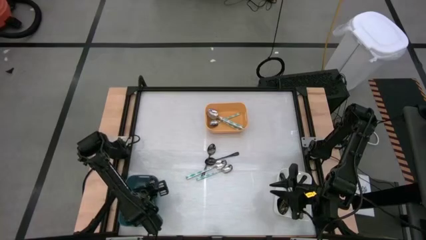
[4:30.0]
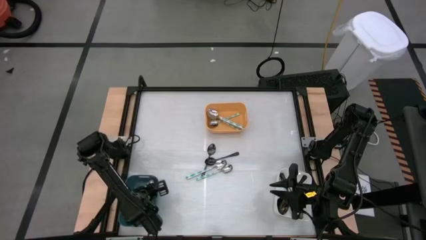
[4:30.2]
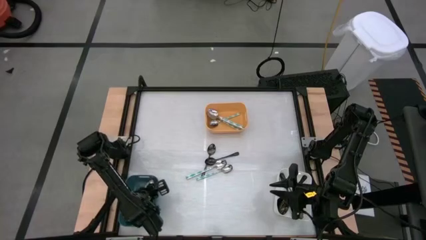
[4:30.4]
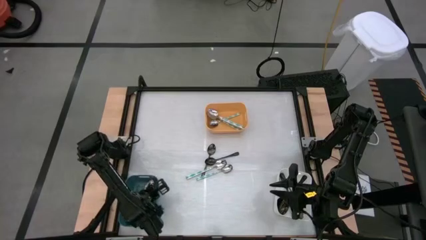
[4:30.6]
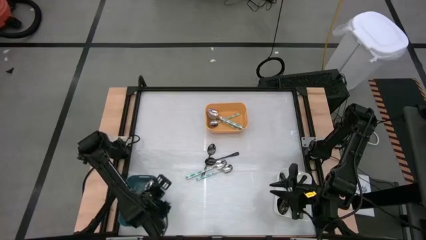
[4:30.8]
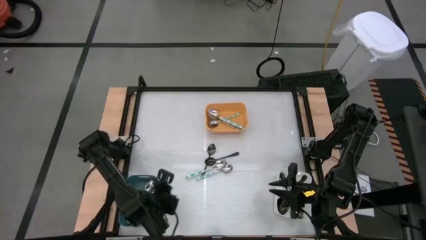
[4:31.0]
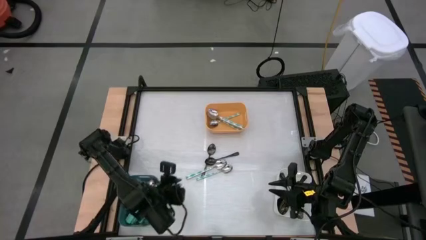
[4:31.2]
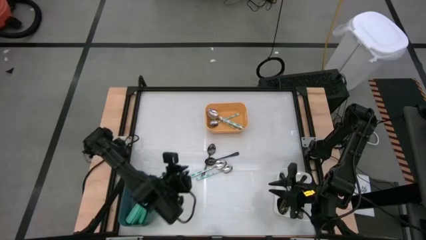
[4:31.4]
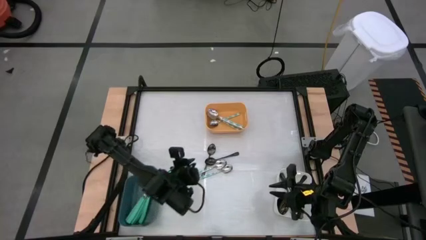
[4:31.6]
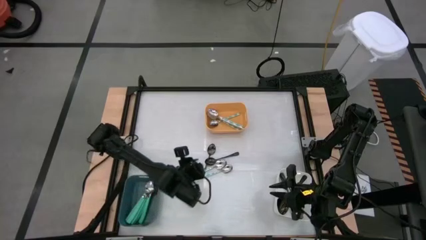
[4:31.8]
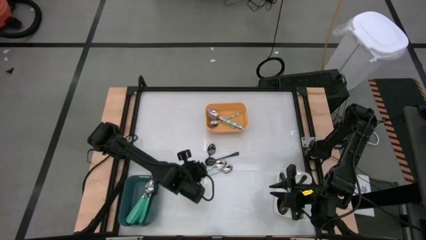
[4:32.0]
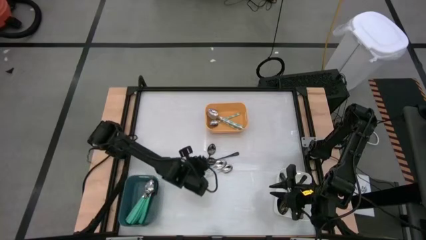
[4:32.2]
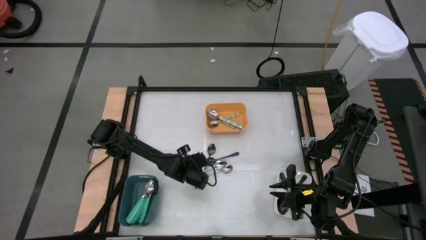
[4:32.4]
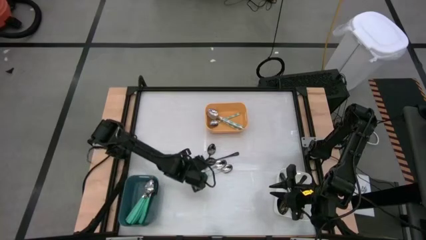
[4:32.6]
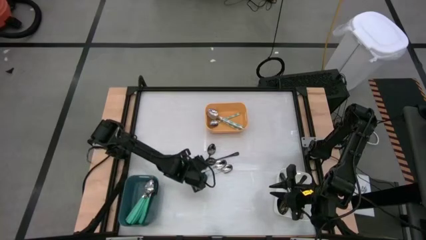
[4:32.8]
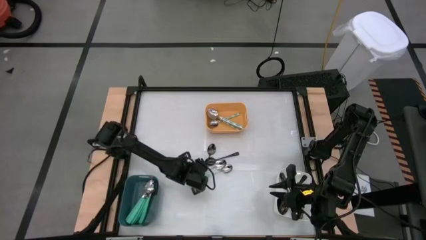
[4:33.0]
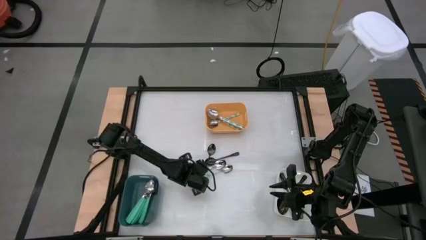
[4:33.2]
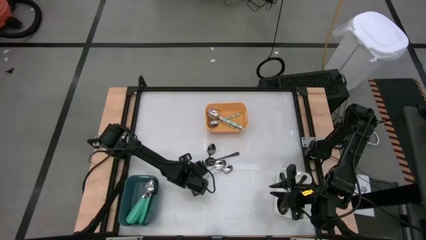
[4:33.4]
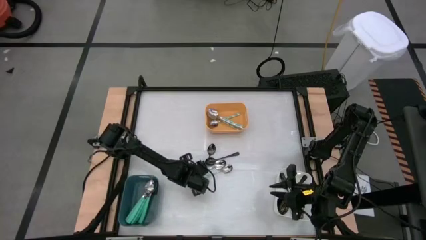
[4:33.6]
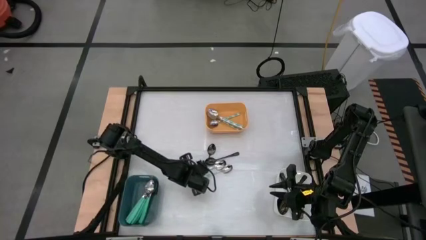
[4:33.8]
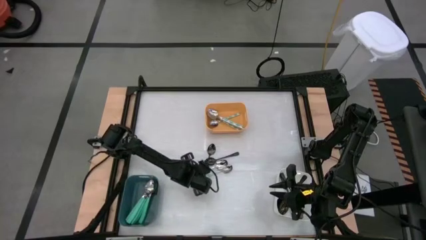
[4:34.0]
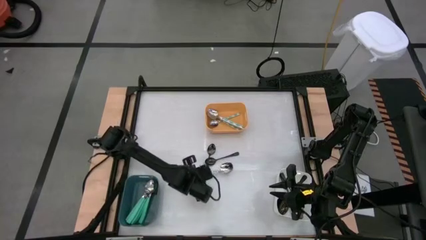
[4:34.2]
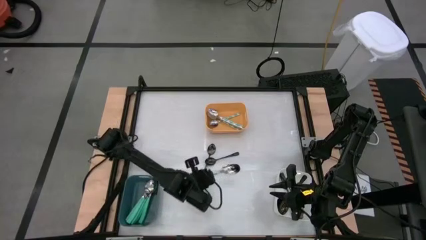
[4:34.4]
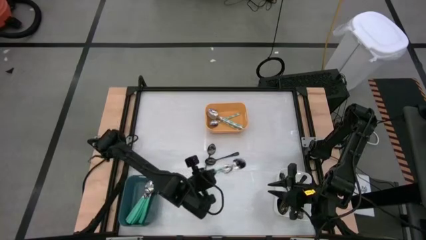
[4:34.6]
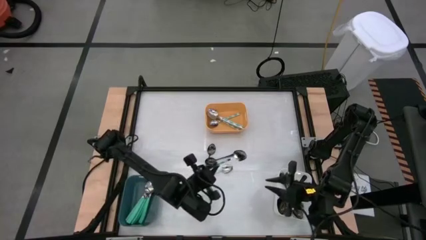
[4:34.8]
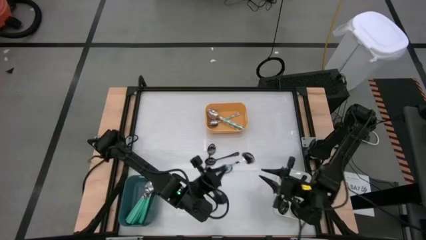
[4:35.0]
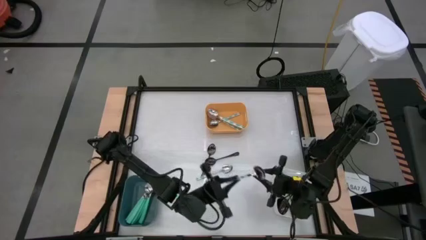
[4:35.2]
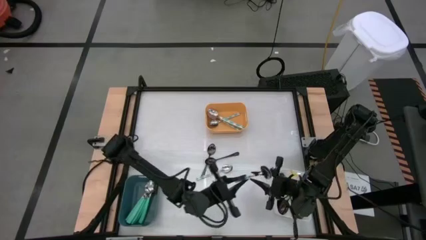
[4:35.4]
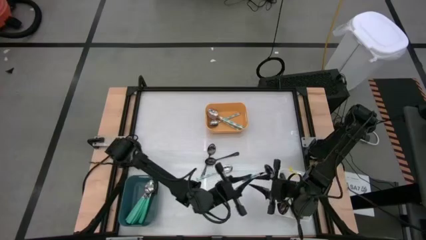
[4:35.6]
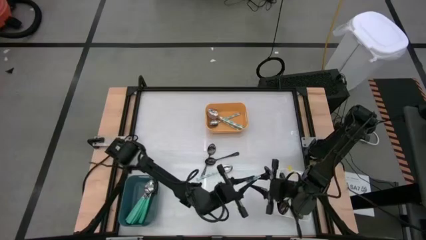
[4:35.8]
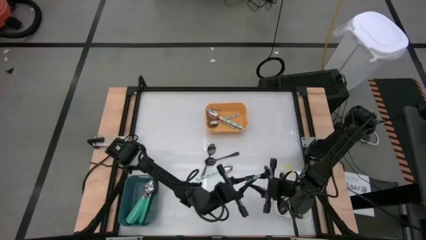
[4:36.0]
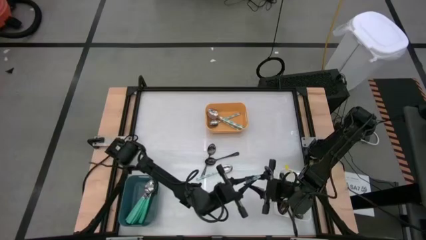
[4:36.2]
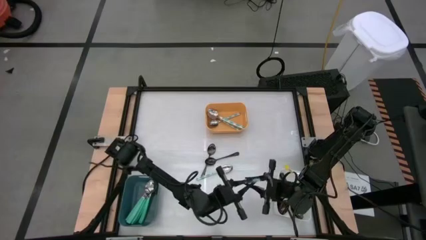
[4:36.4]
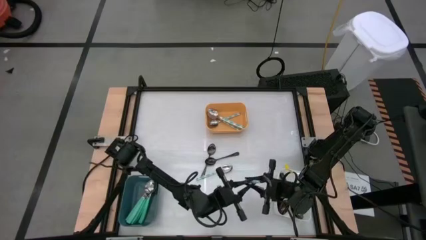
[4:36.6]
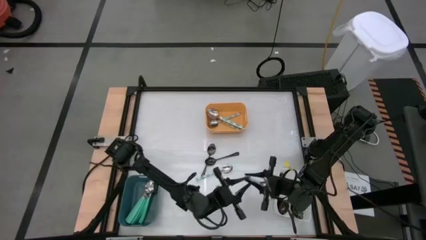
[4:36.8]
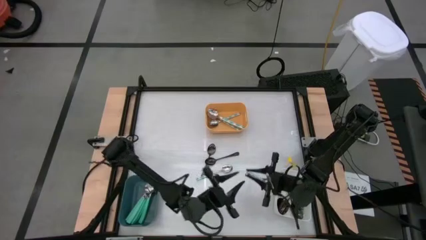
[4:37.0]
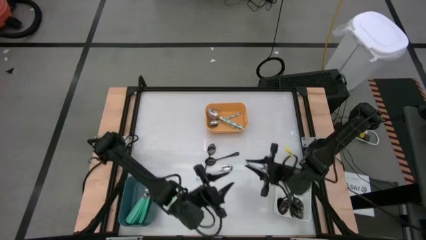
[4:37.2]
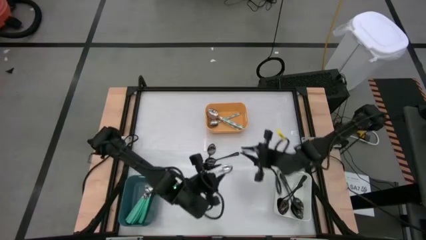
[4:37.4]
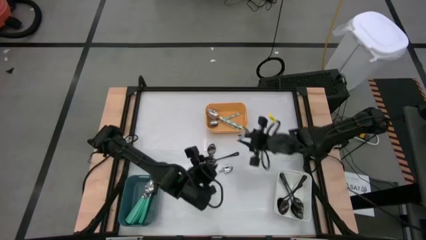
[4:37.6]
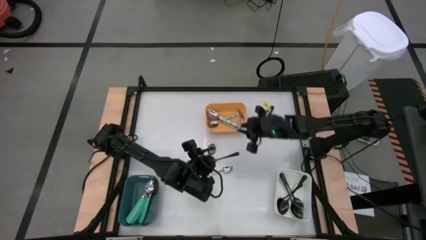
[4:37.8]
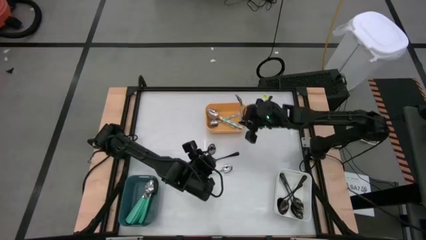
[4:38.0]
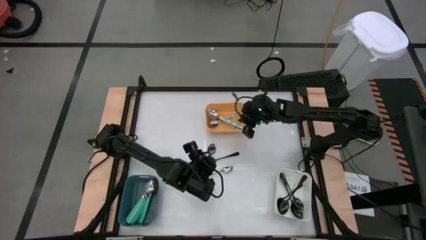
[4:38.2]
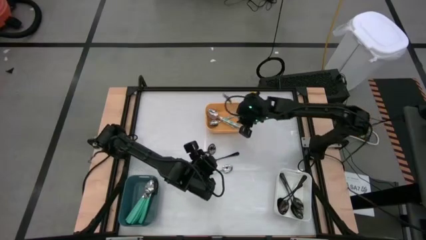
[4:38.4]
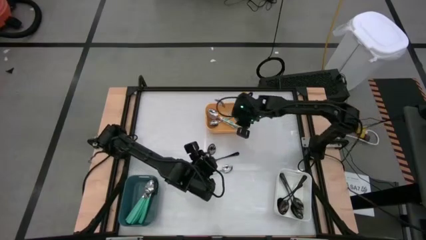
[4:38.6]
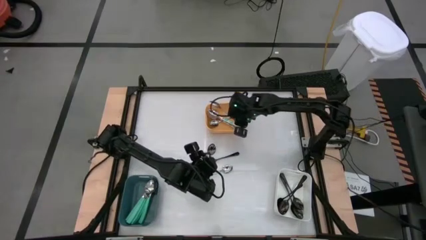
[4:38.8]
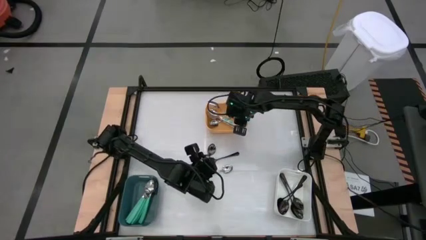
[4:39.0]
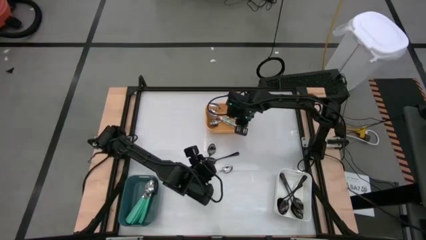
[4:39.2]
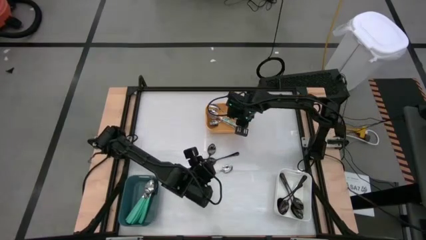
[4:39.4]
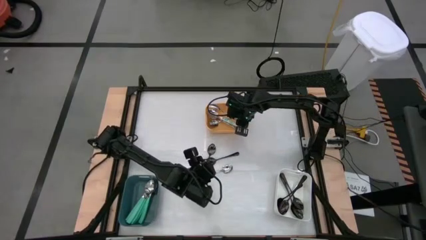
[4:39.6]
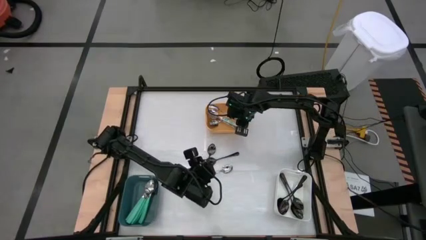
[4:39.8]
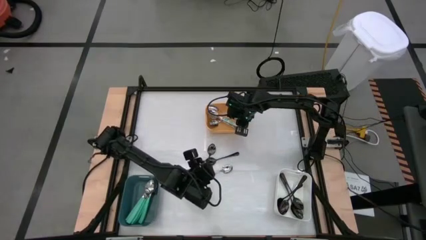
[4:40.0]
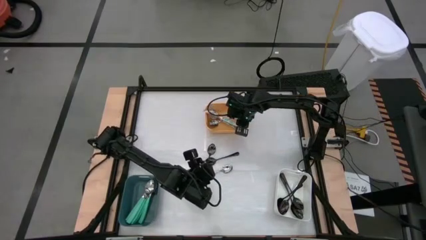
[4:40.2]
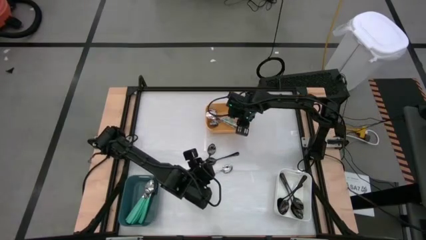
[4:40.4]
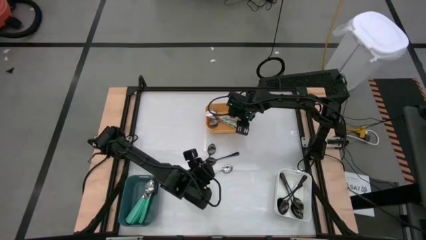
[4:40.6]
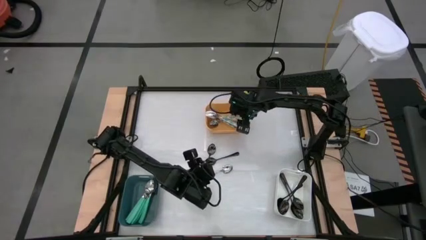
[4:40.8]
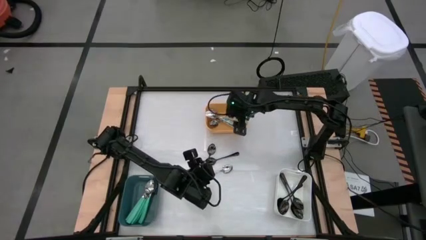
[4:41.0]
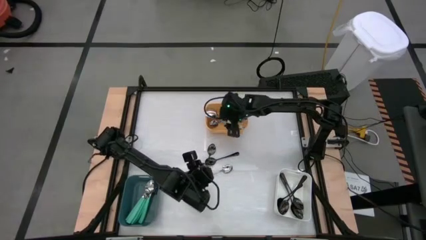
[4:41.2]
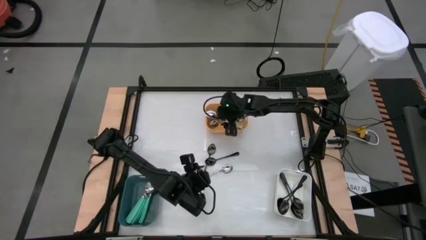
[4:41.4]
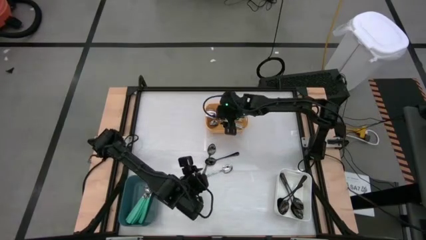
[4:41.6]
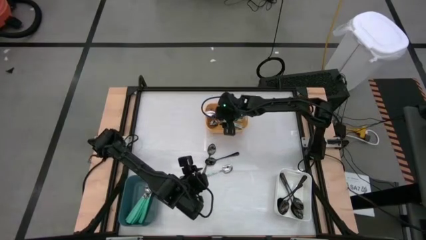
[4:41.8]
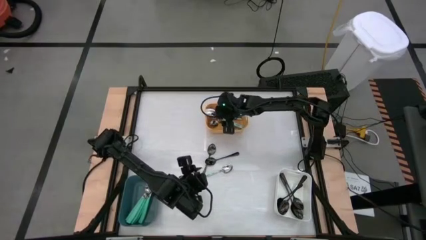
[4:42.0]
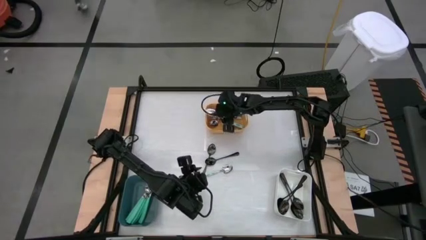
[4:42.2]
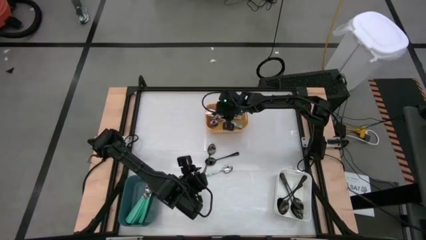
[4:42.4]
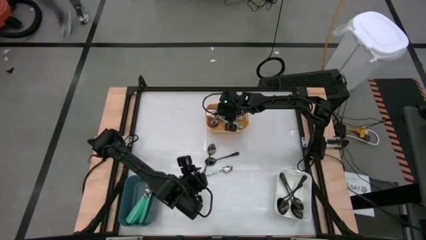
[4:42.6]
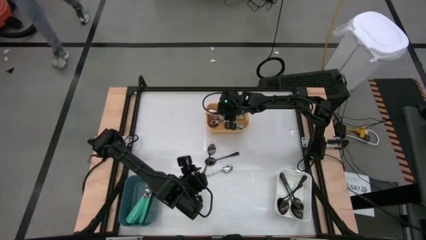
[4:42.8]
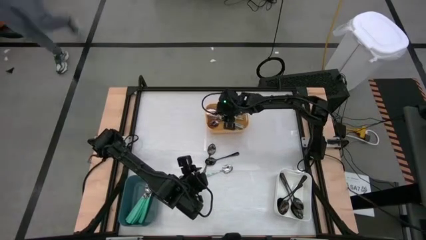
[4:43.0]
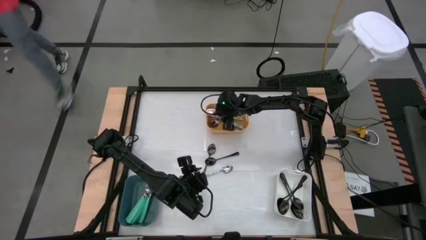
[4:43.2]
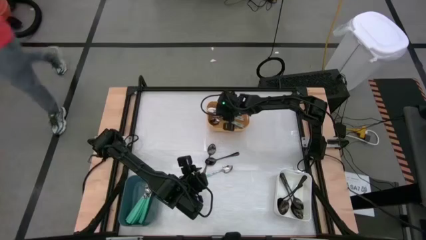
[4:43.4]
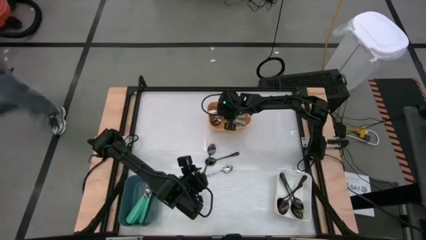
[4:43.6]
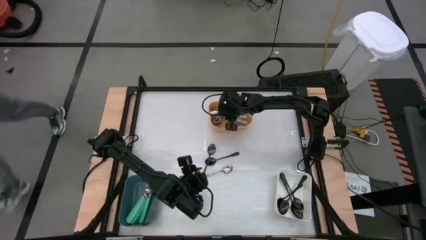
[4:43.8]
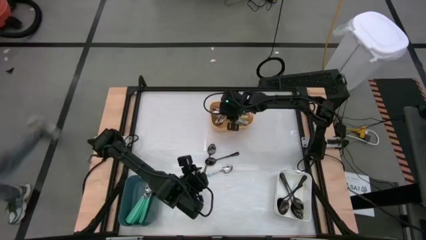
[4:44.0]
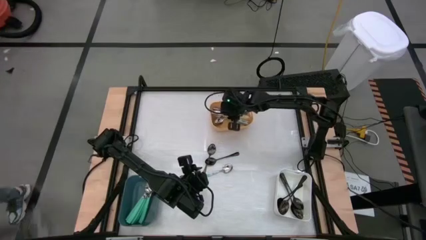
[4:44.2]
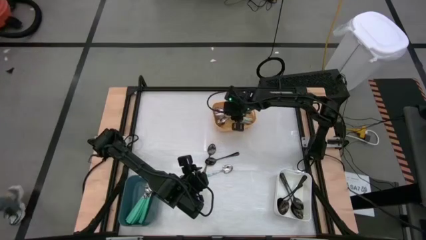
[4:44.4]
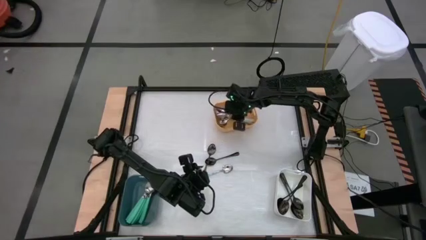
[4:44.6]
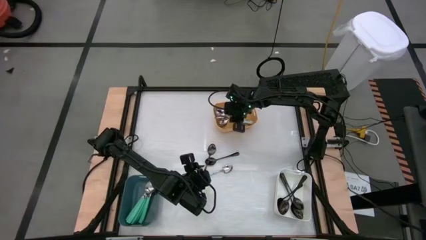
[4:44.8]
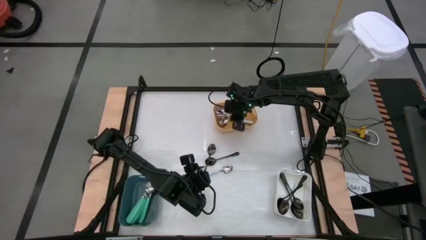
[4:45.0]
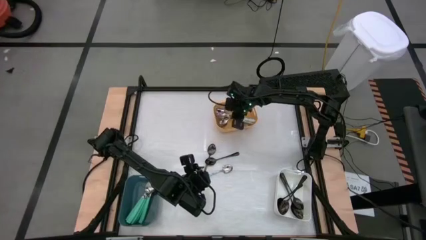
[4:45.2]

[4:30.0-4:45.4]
Task: Sort silverware by color (type)
Put the white patterned spoon into the yellow bin

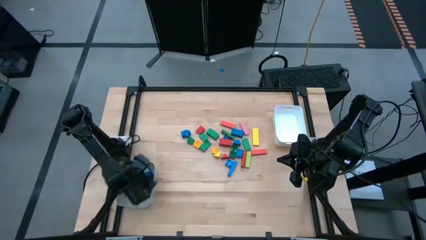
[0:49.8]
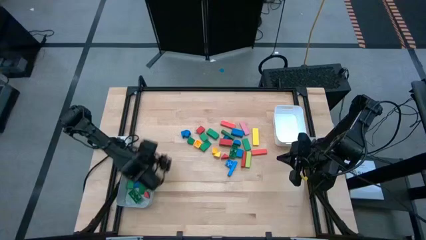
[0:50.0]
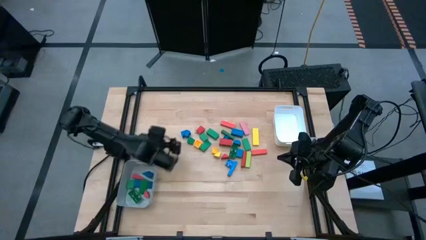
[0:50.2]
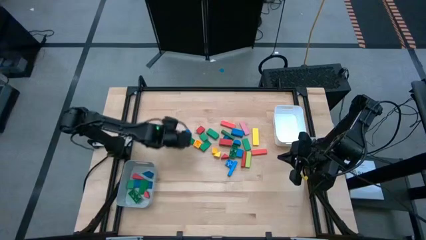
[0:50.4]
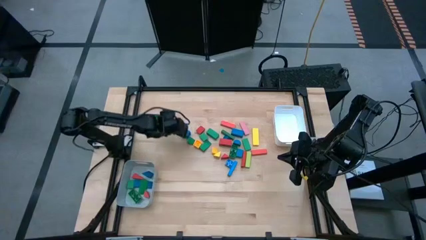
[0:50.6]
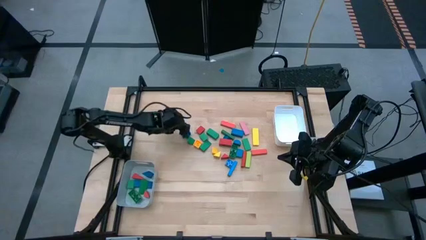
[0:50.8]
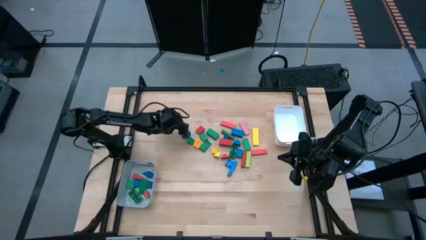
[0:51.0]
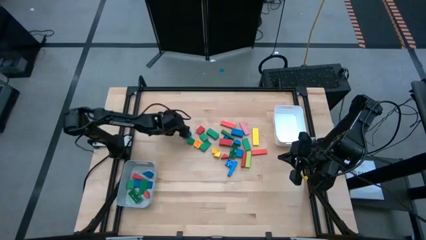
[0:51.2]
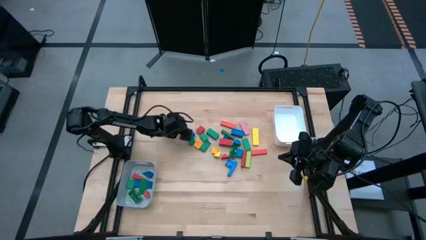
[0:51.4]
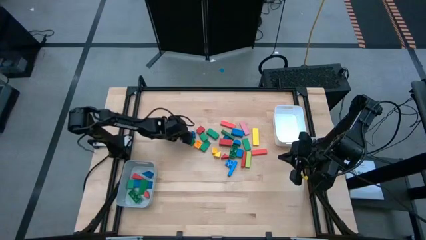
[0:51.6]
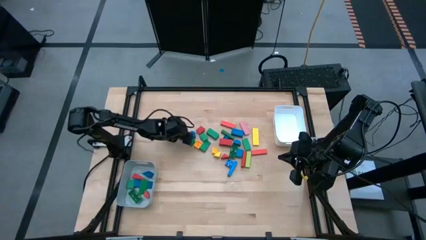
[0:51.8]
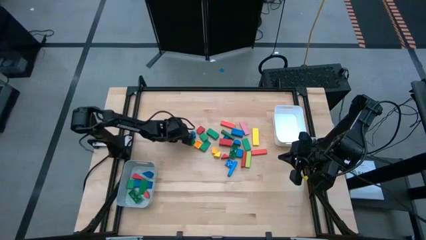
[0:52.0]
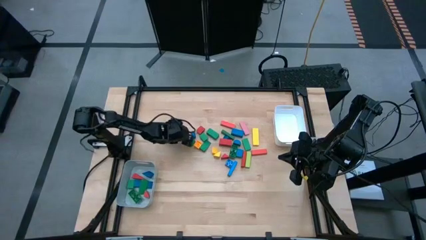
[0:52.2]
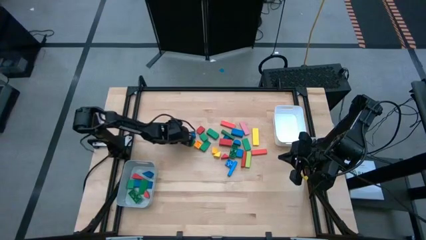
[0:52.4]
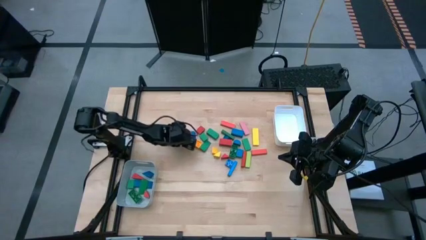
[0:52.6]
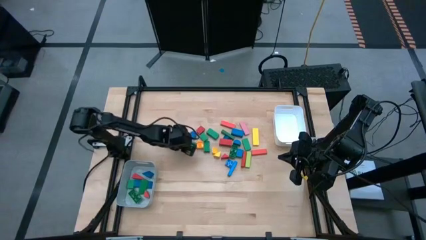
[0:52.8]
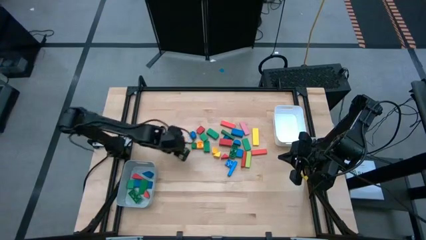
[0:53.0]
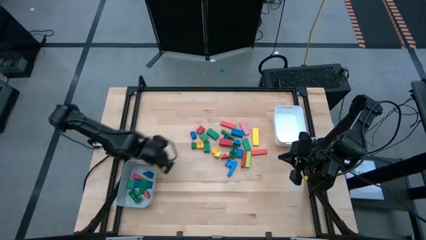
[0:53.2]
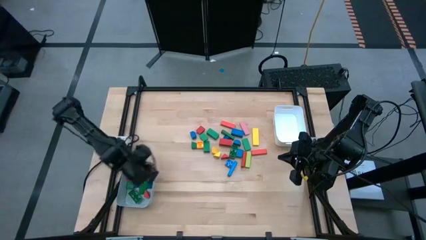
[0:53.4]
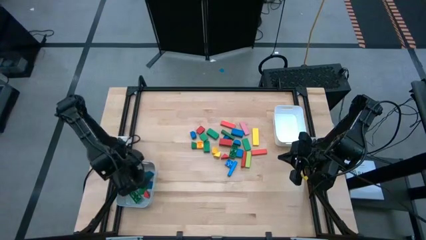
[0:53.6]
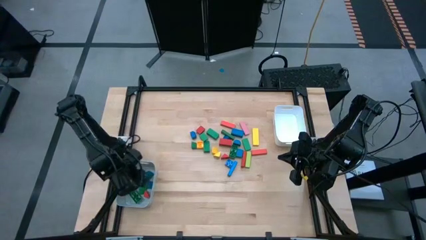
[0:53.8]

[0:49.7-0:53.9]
Task: Sort blocks by size
Put the blue triangle block into the gray bin
